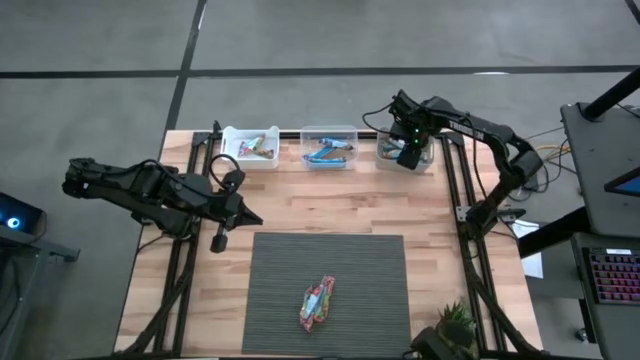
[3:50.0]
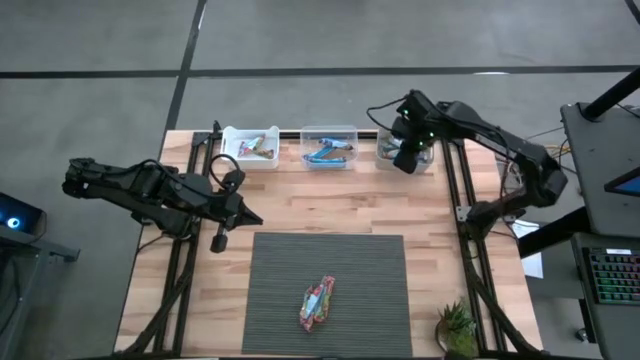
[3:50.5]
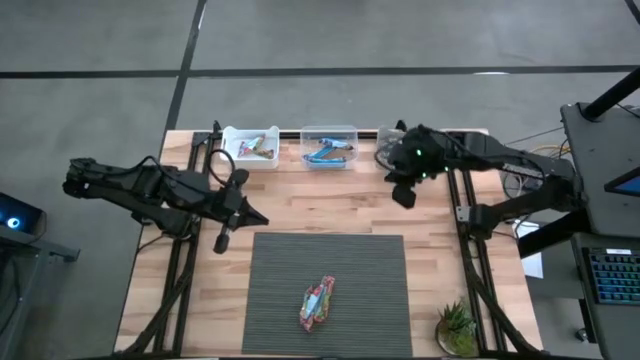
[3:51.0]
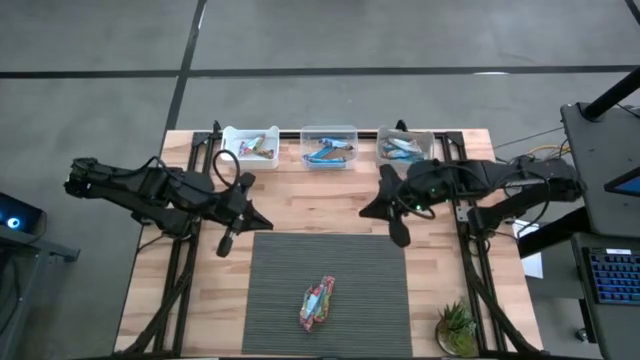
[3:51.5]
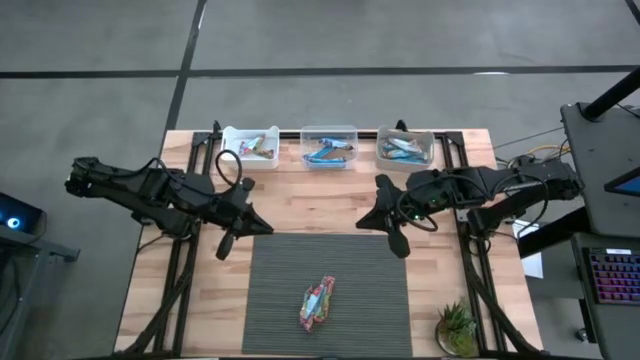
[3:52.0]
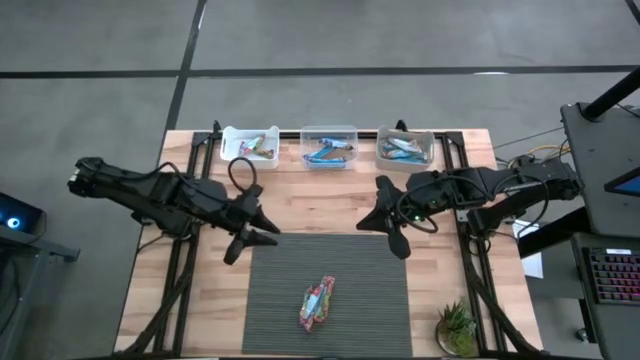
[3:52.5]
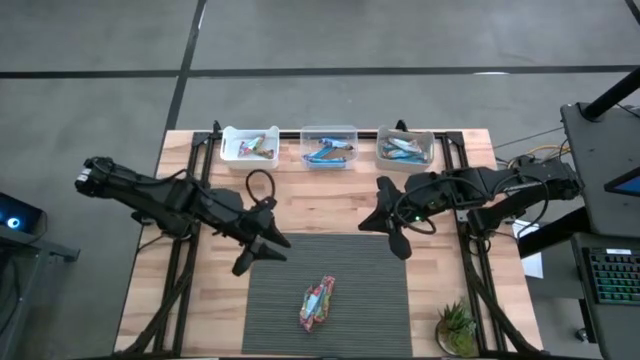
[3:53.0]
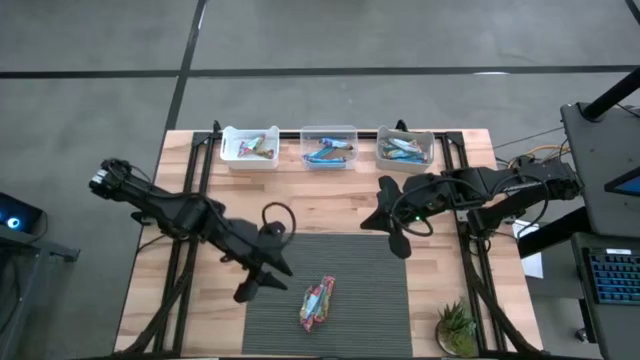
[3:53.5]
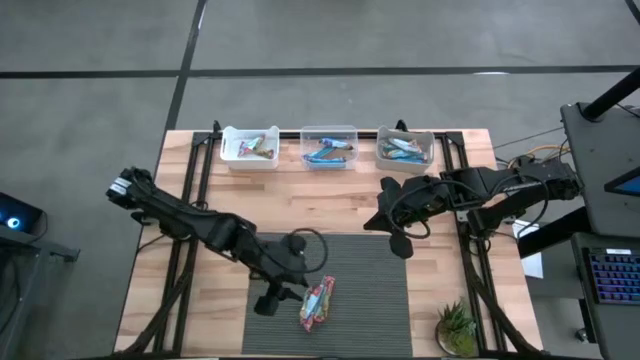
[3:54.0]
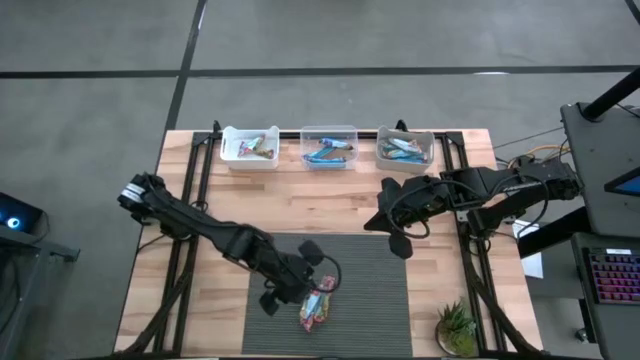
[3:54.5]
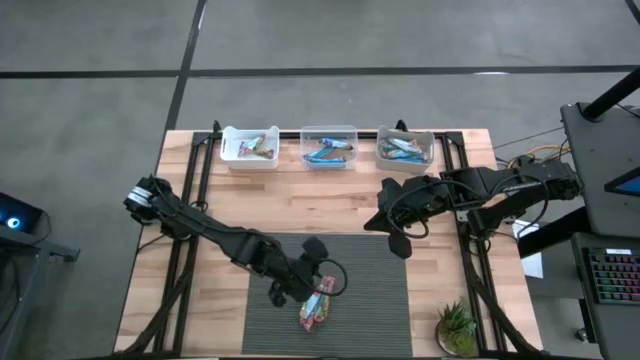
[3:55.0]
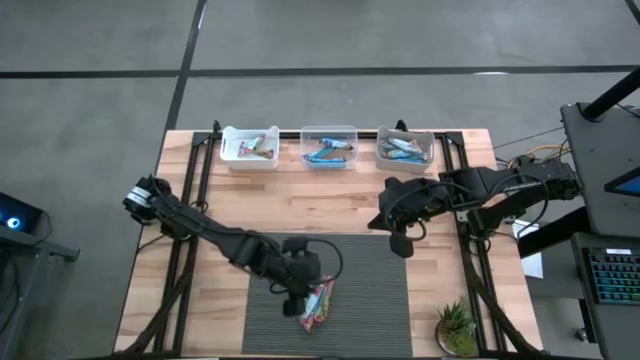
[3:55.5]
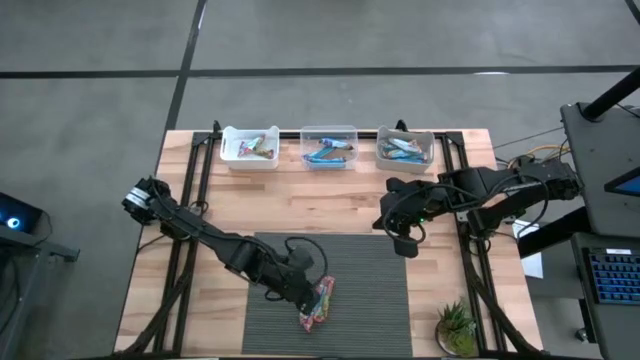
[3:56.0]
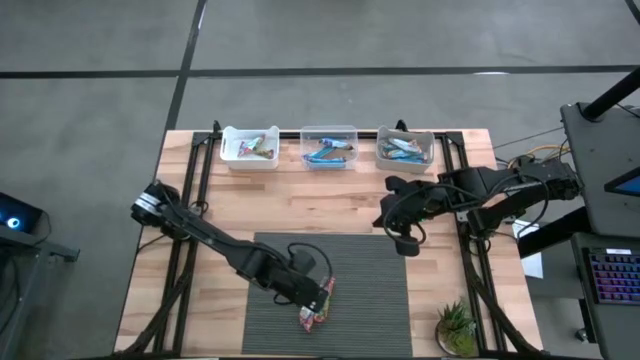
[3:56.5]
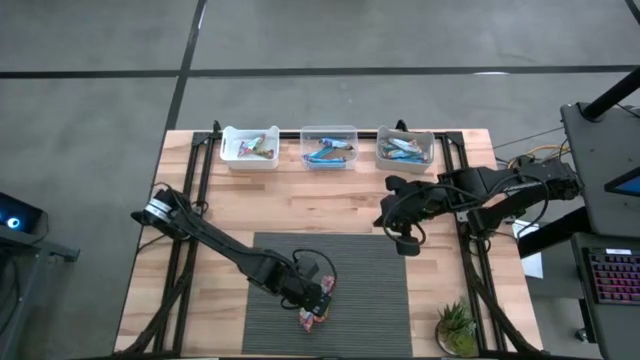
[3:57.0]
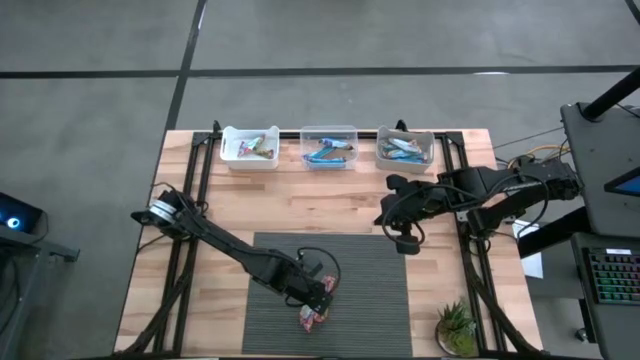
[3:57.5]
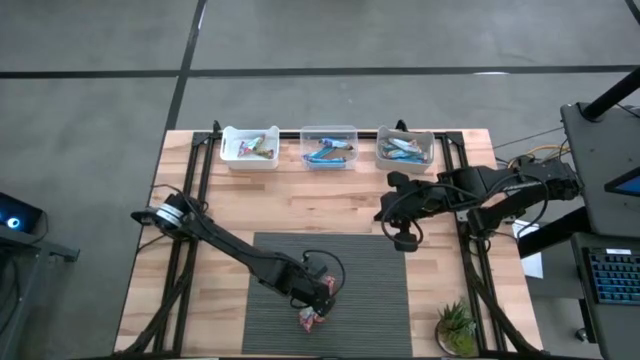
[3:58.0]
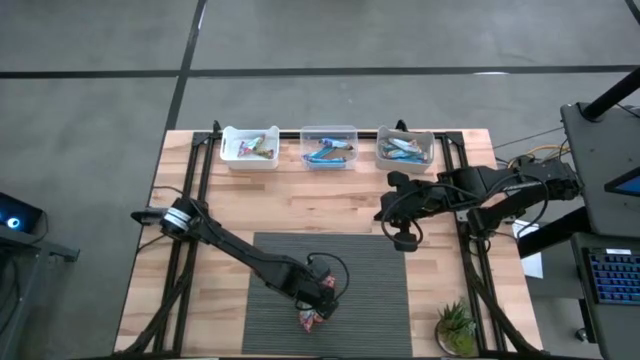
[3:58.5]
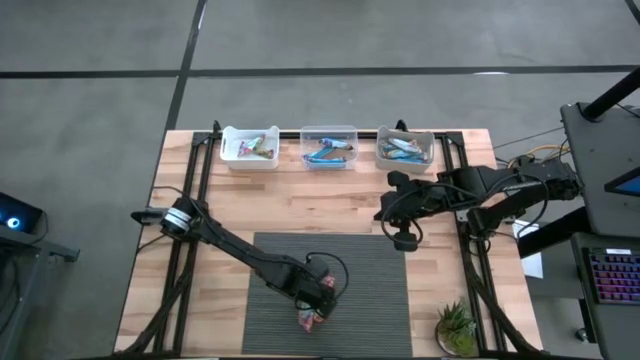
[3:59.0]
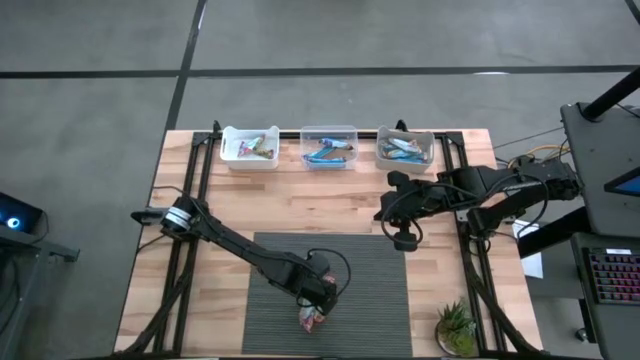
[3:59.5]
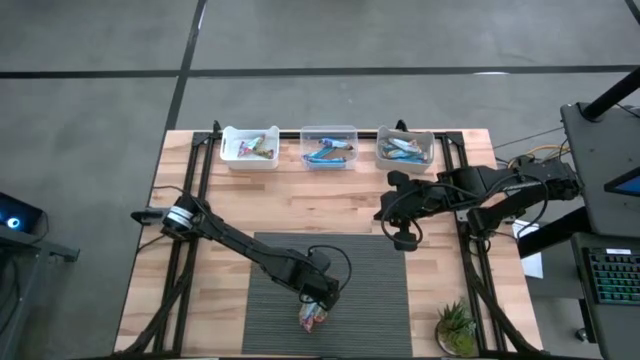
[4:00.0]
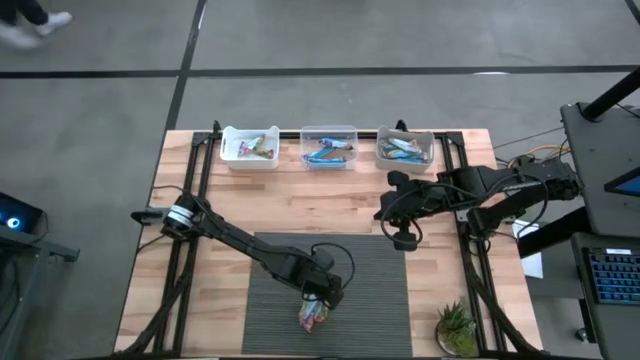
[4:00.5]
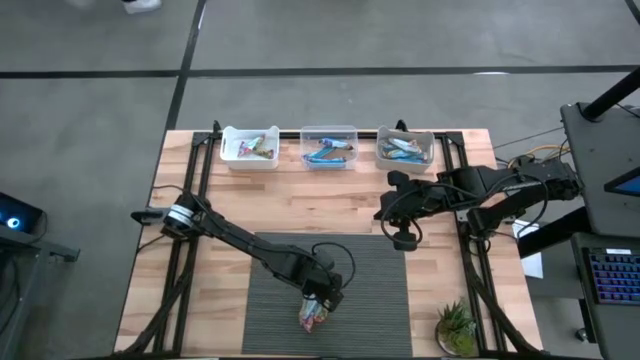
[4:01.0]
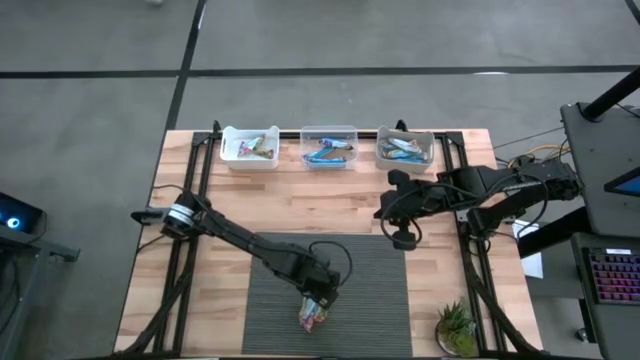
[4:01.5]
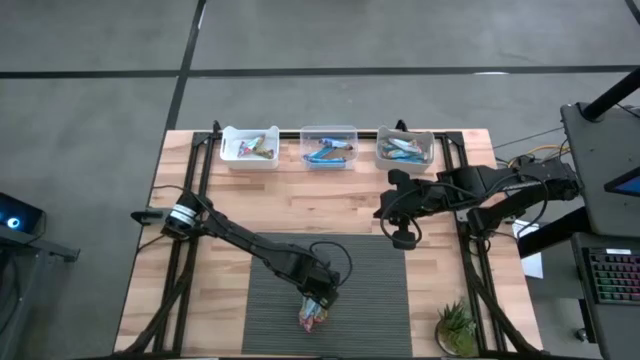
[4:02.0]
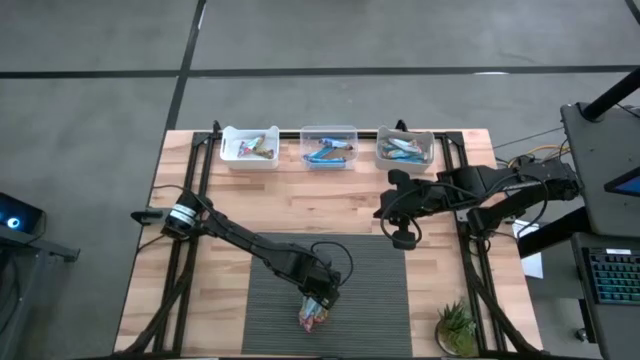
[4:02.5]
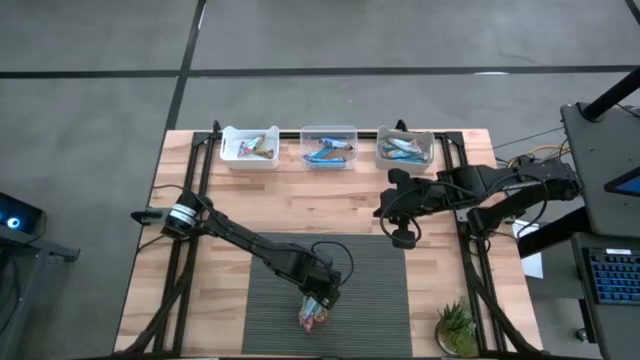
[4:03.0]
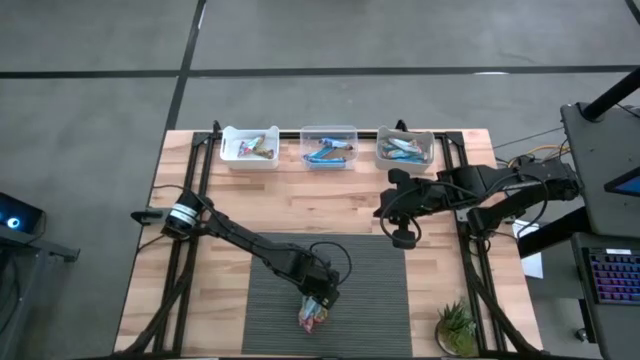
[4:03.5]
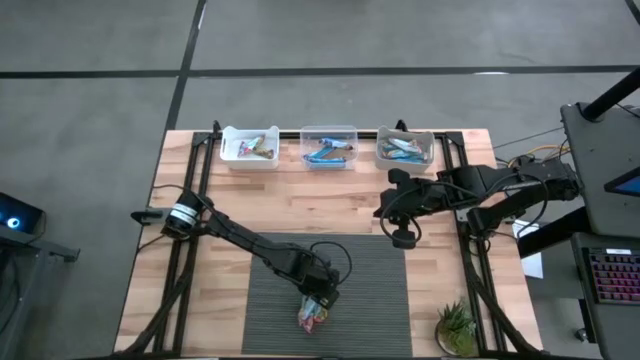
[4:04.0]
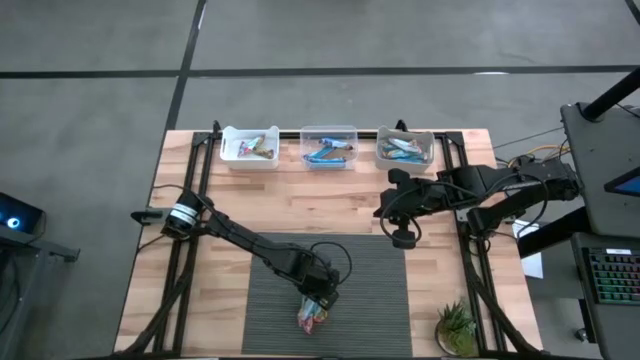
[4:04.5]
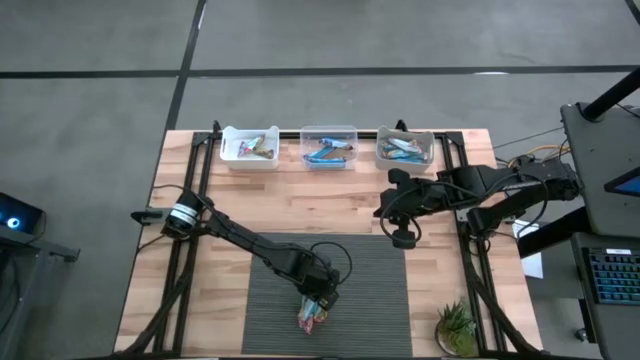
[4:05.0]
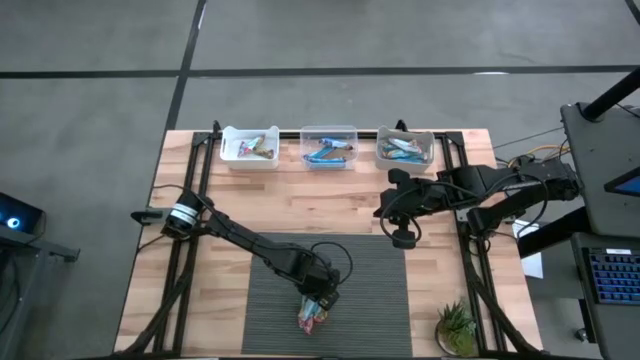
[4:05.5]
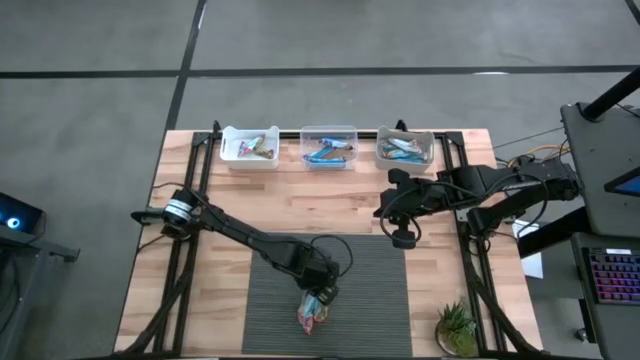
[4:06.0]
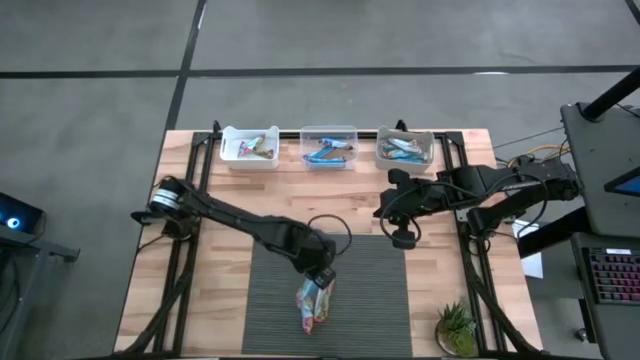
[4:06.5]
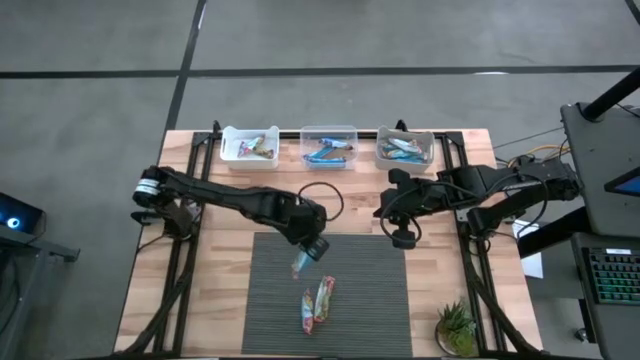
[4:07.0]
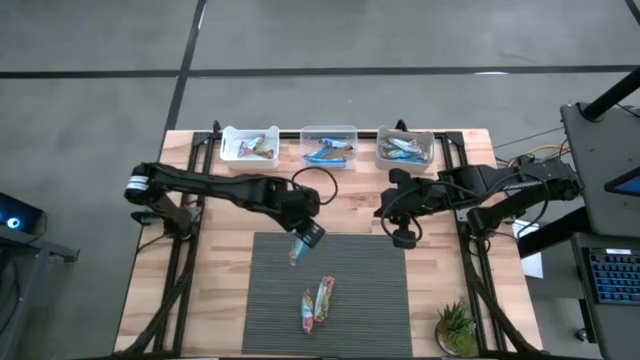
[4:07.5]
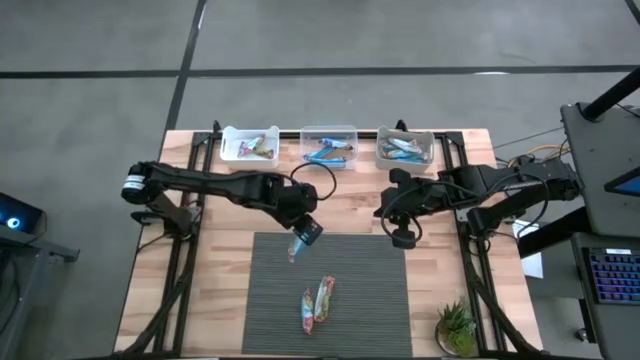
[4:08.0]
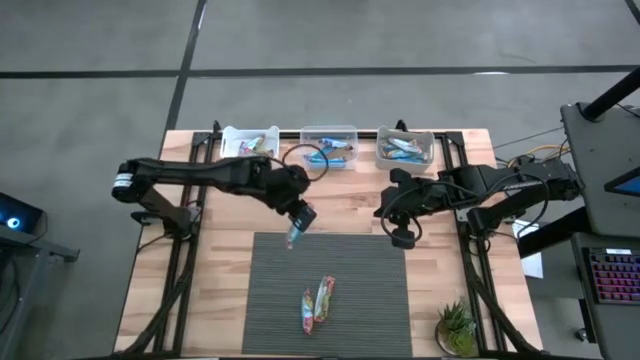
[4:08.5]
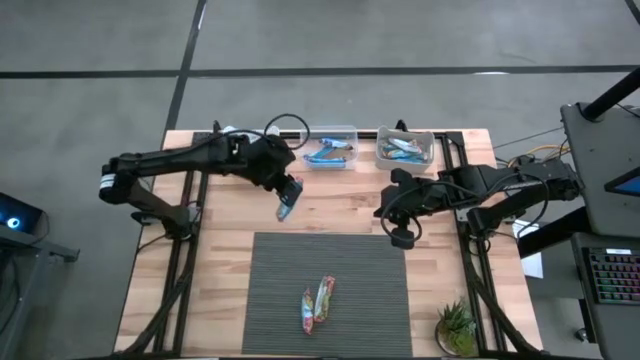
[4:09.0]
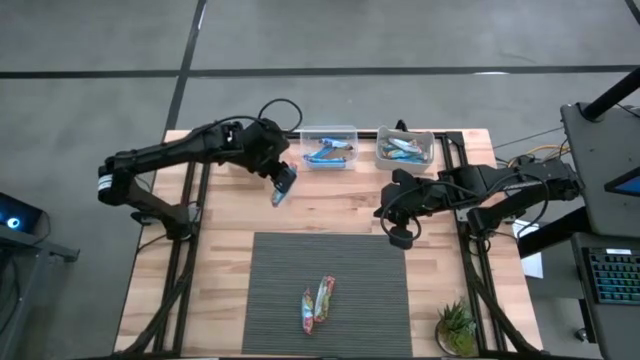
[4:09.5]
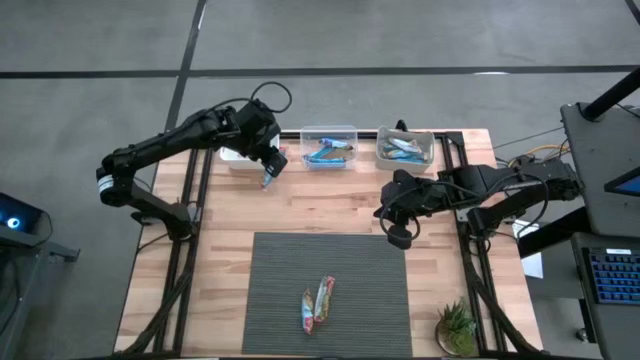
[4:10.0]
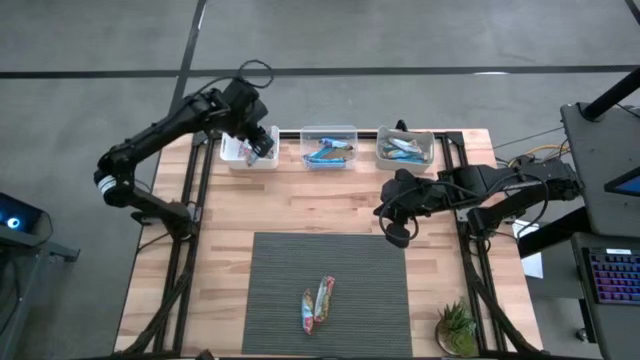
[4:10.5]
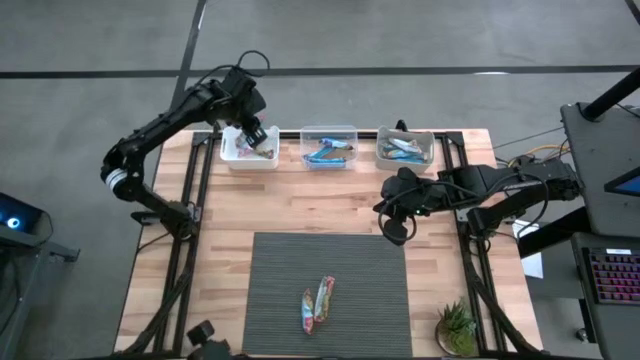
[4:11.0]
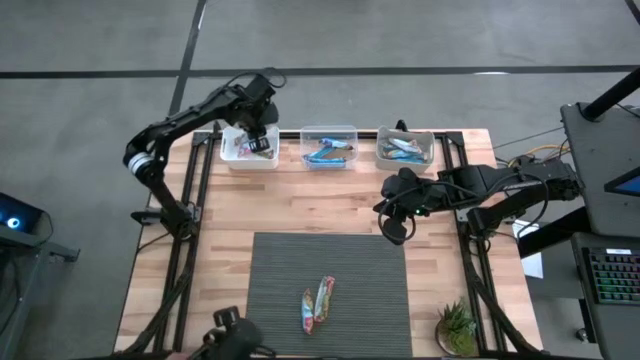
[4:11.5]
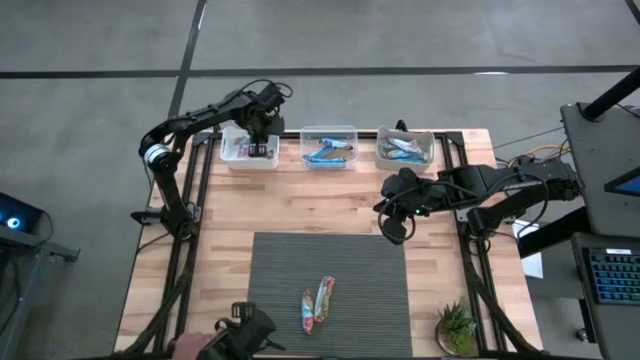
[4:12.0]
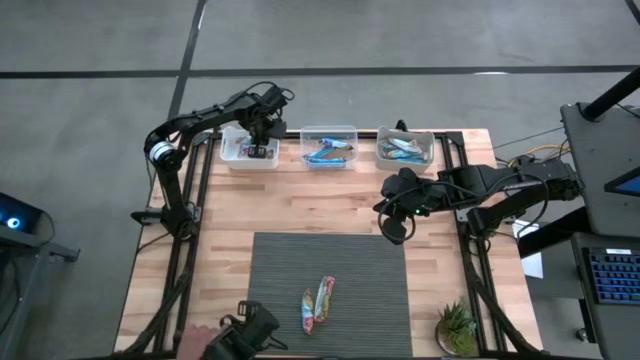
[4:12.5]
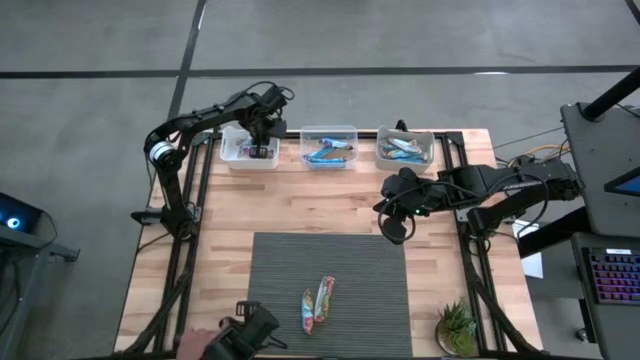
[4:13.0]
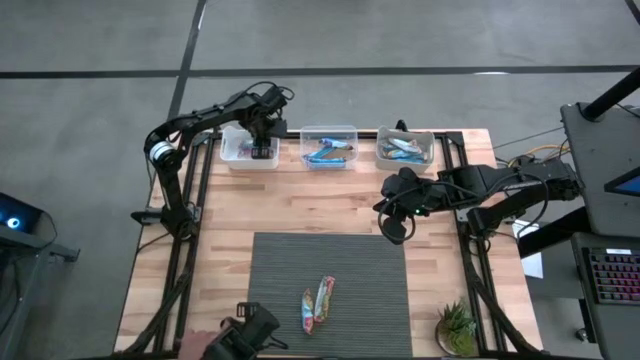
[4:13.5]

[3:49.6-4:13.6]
Task: Pick and place Granola Bars by type
Put the red granola bar into the white bin
